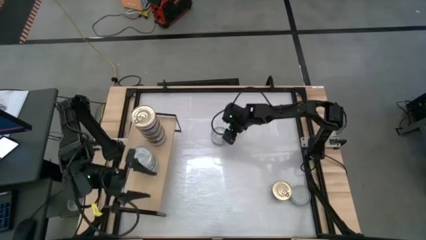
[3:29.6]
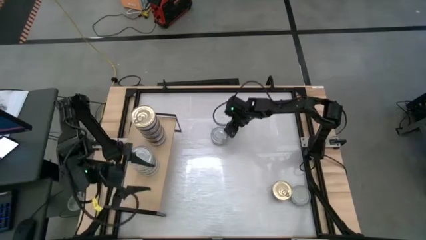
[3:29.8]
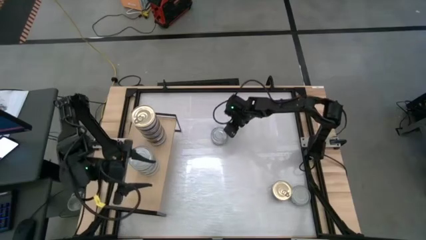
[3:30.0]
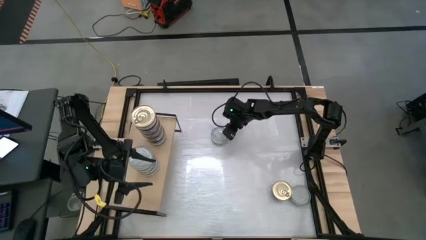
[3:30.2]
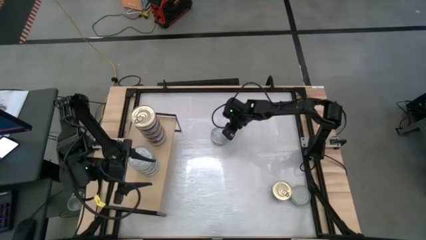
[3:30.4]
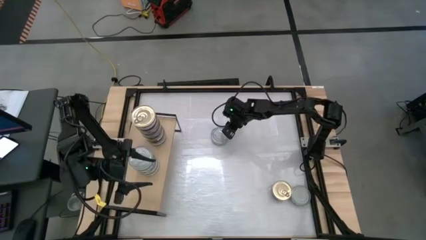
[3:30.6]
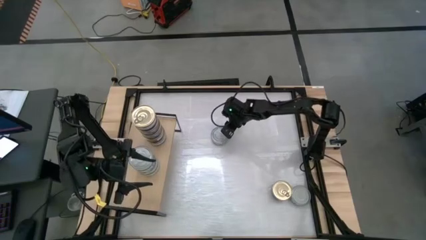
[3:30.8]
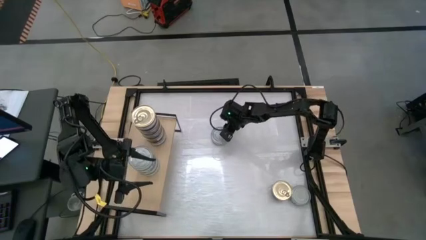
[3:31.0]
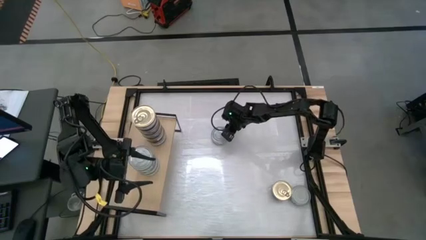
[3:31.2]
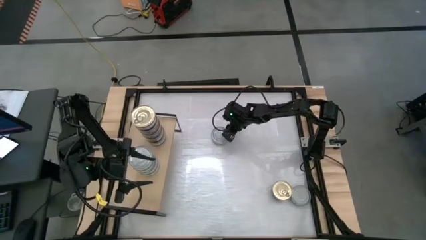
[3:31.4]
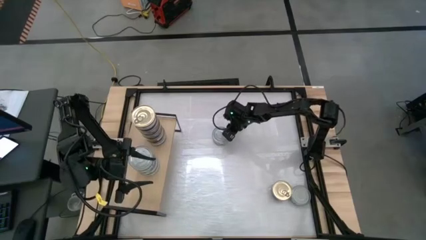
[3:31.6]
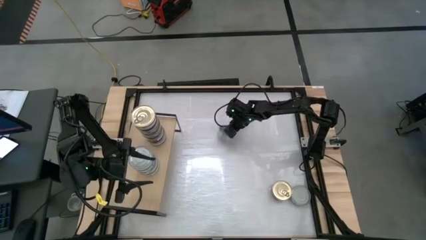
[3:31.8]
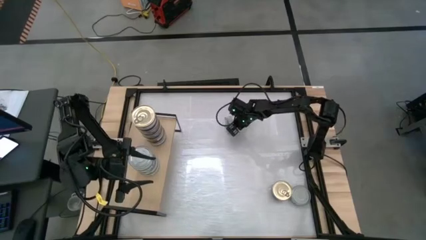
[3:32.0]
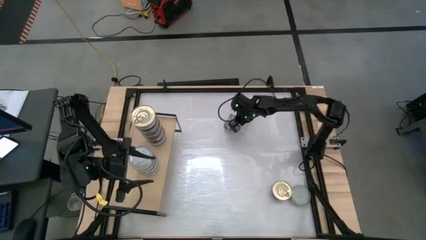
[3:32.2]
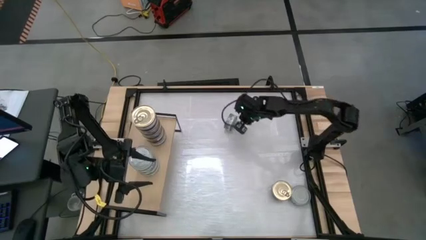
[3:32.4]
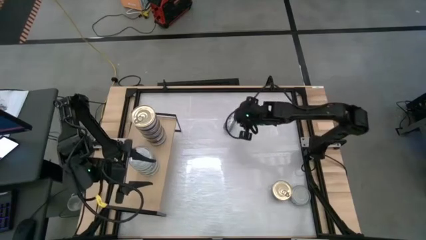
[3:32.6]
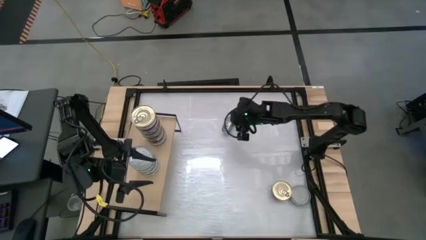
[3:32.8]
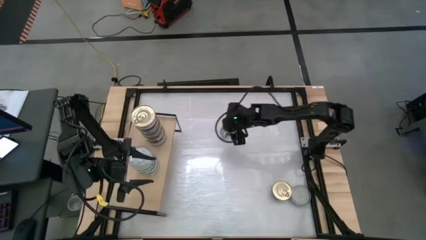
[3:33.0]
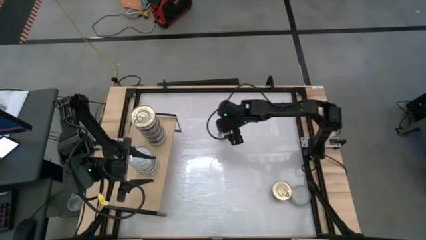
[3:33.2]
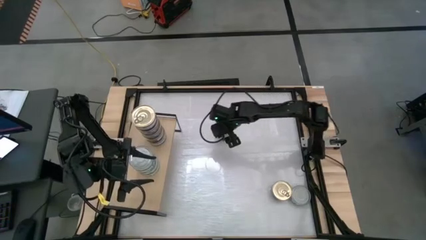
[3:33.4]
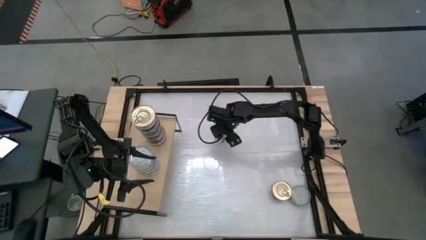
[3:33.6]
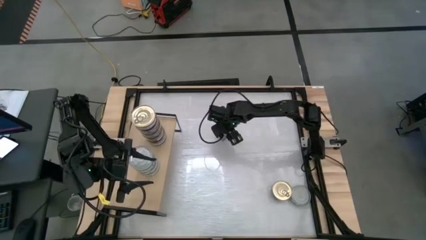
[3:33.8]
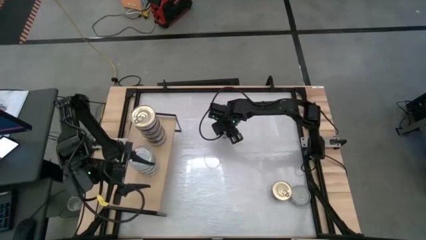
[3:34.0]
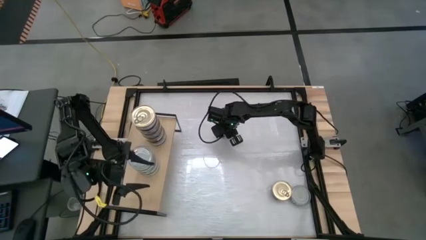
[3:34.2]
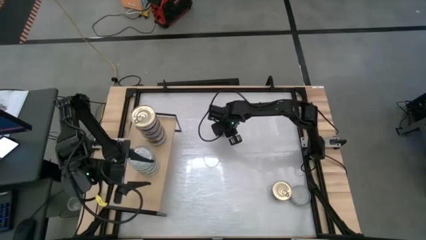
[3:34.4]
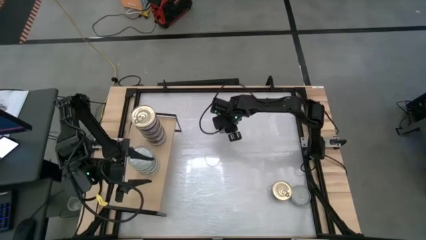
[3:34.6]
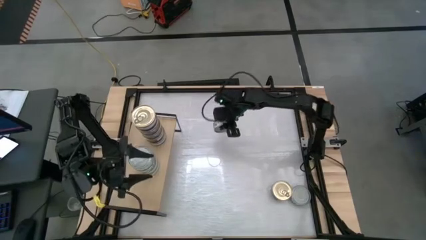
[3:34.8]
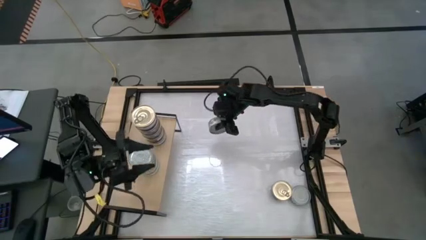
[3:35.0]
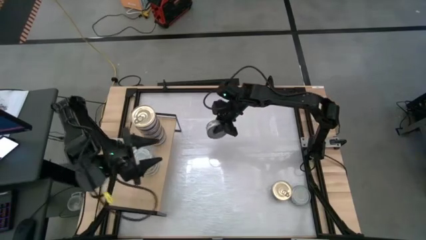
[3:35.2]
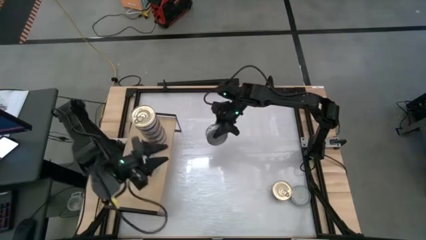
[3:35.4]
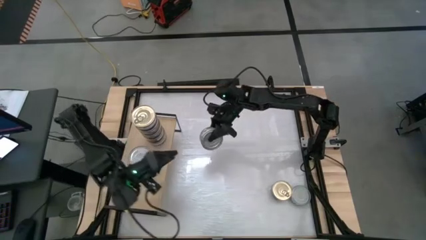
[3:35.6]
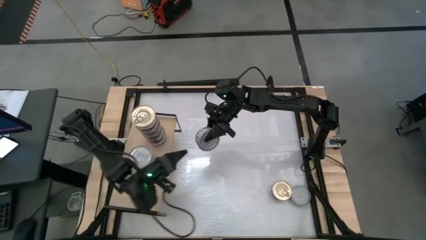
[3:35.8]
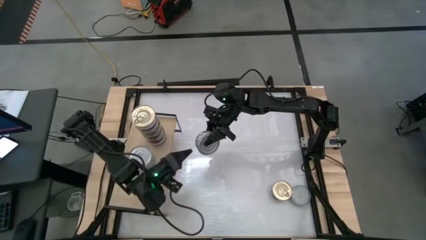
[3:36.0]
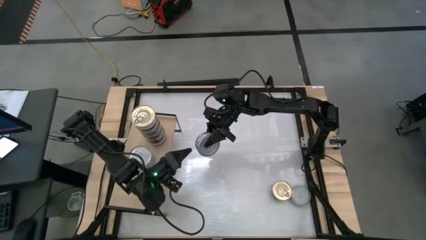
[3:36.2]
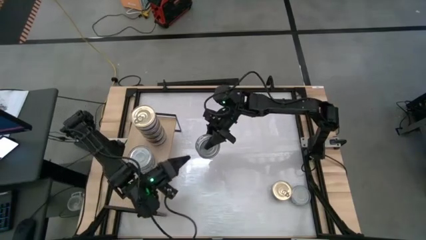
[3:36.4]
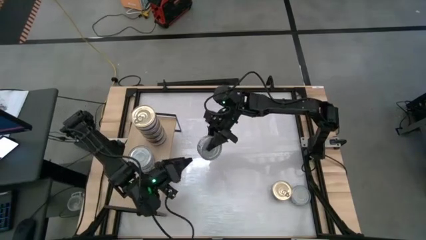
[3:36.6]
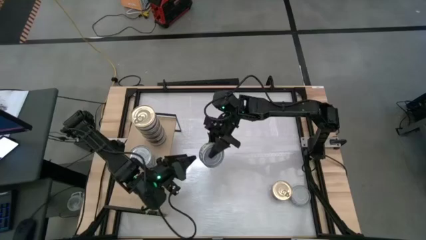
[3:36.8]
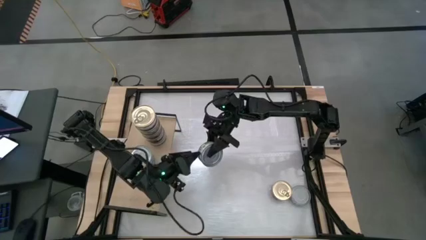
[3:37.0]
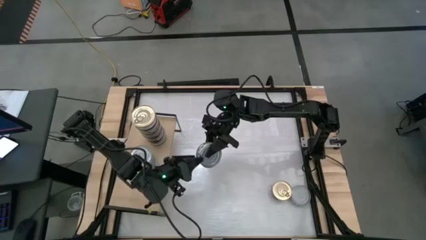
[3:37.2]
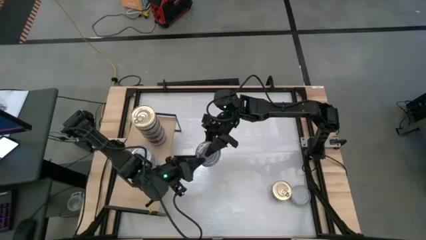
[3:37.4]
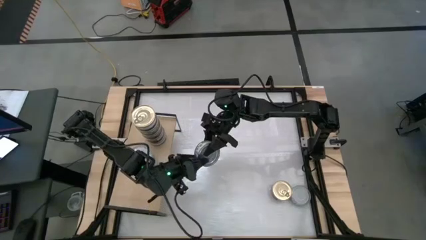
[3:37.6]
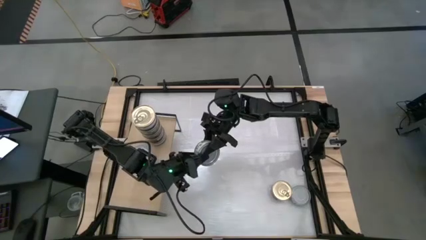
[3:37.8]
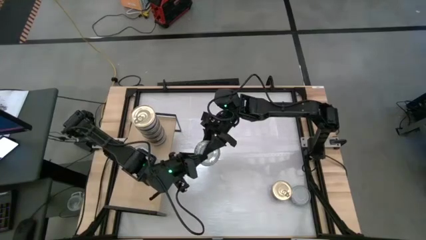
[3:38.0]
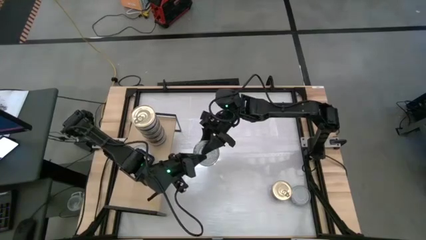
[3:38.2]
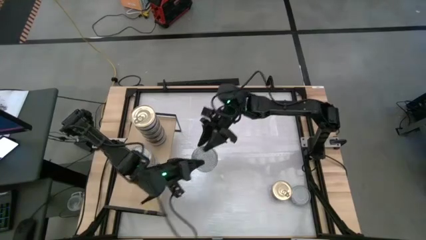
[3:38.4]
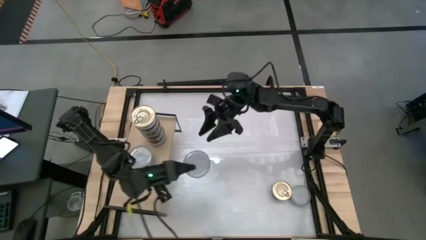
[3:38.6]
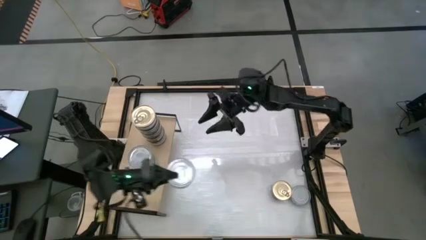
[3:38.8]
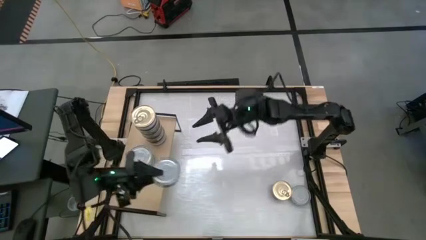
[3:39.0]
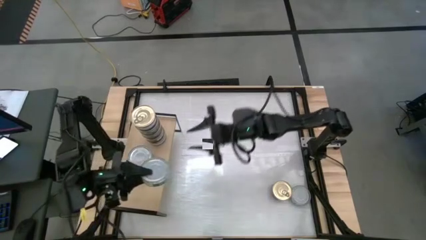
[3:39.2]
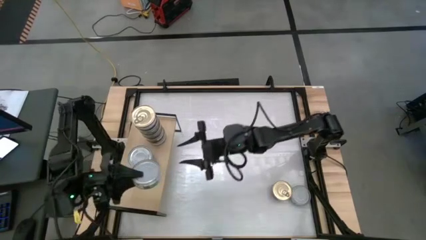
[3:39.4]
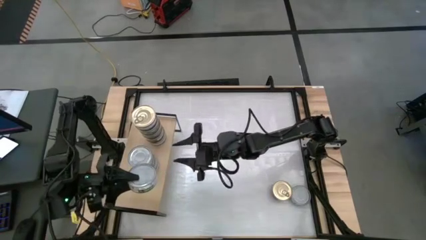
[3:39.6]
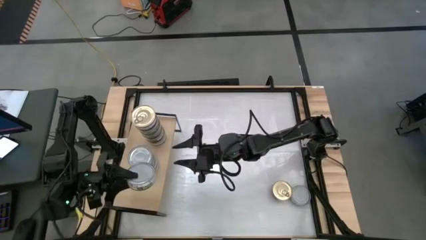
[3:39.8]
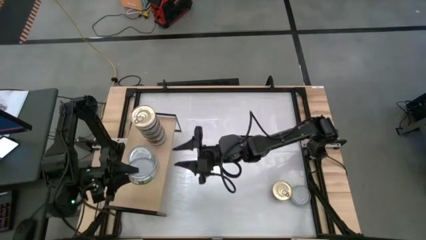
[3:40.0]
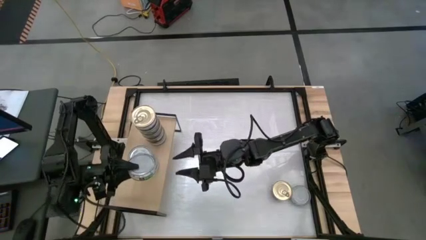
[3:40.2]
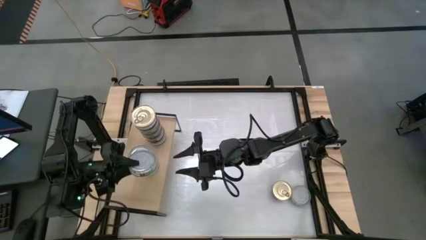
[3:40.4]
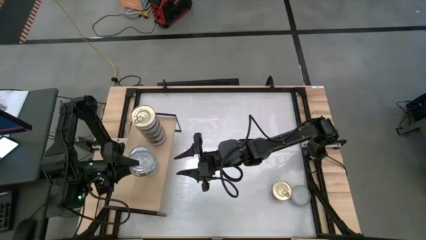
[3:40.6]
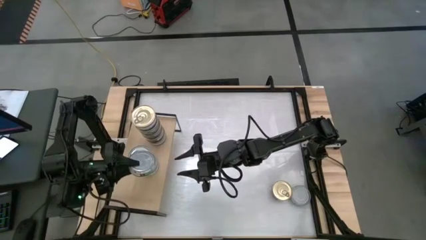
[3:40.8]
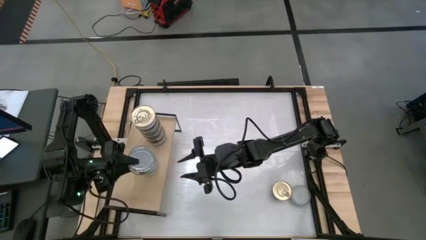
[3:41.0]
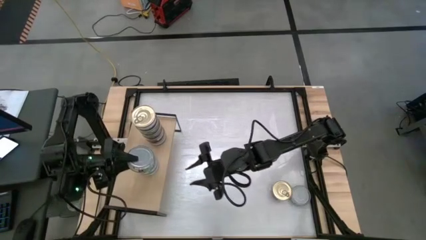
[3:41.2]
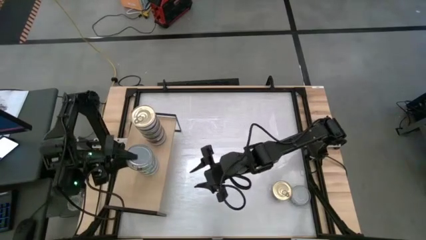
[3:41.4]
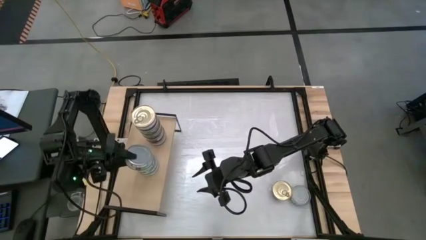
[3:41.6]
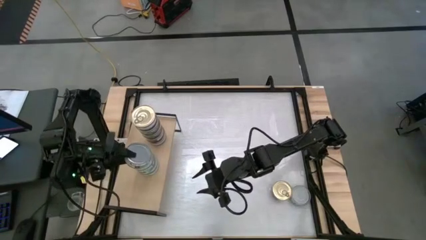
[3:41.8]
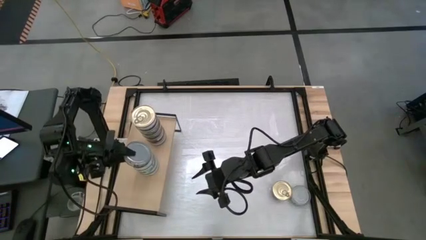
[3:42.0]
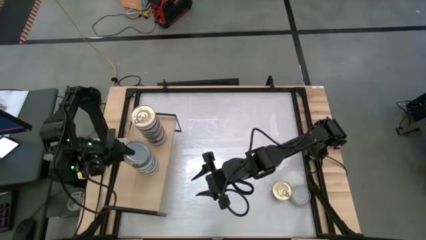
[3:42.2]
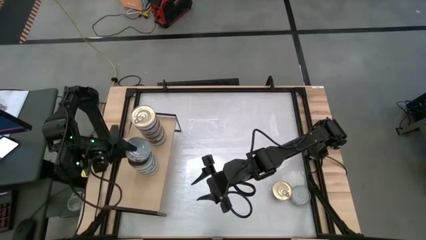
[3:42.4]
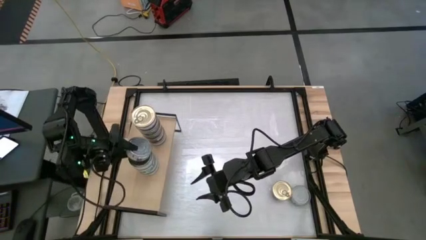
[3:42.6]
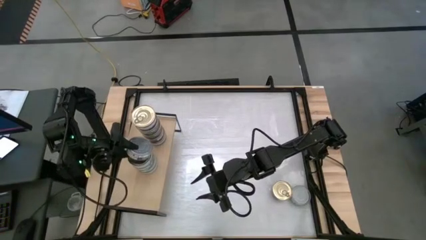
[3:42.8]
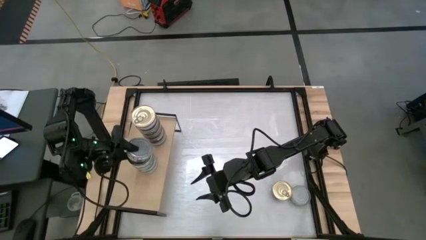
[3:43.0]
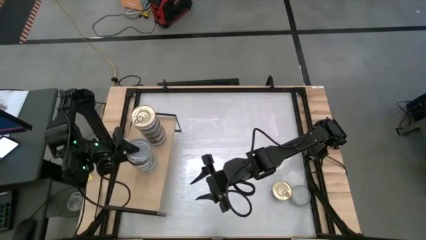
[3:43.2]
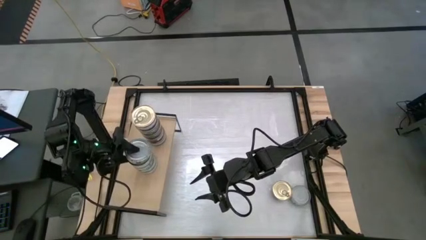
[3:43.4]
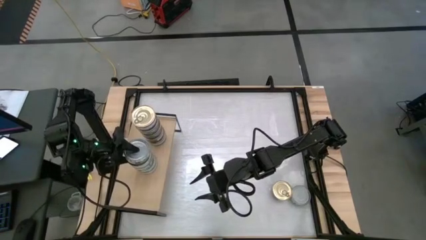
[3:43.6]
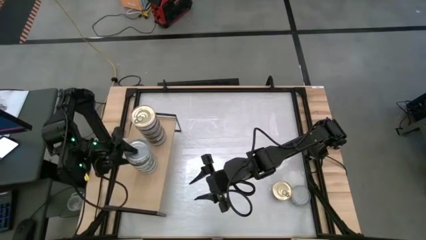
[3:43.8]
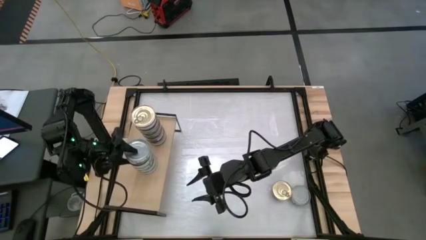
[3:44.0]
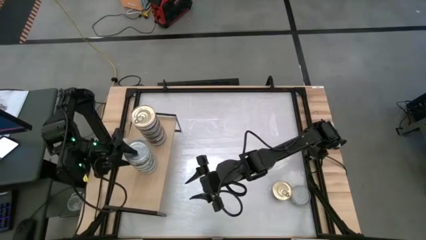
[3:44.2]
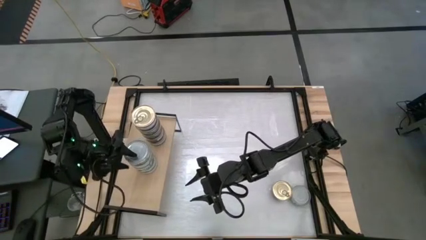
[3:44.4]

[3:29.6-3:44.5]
Task: Stack canned seafood by type on shelf
Stack the green tuna can on top of the green tuna can on the shelf

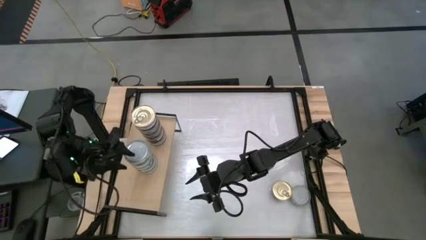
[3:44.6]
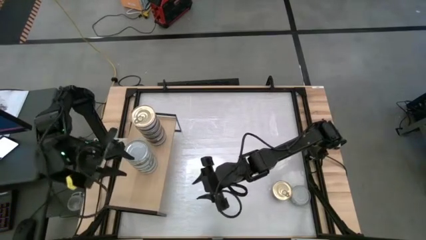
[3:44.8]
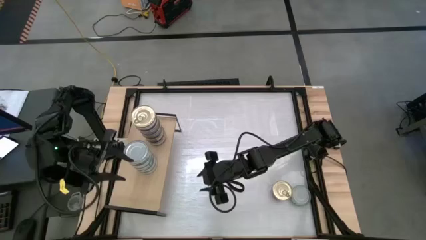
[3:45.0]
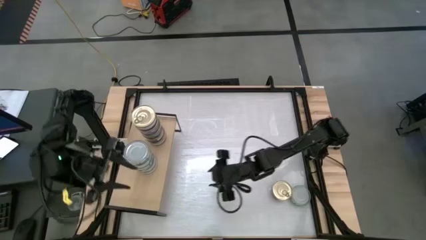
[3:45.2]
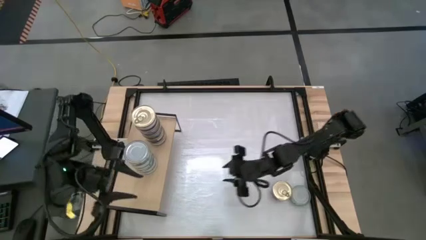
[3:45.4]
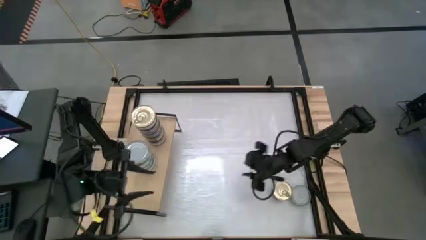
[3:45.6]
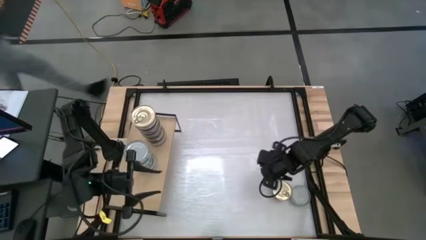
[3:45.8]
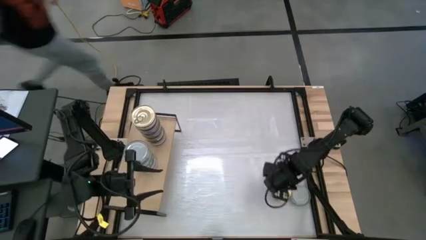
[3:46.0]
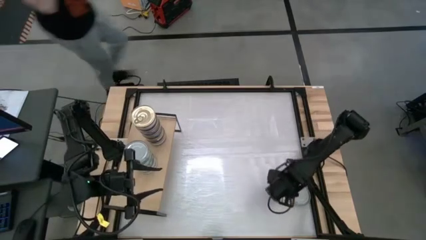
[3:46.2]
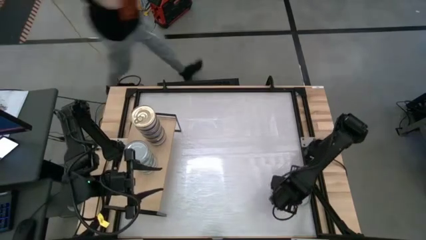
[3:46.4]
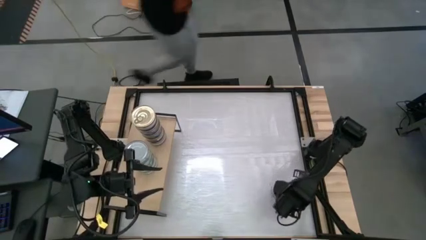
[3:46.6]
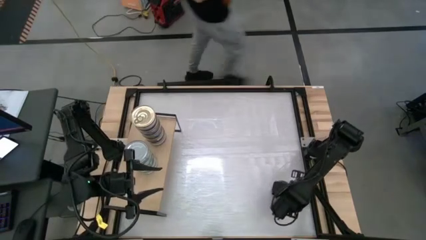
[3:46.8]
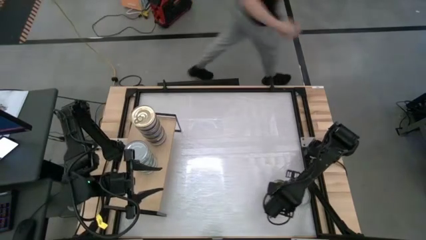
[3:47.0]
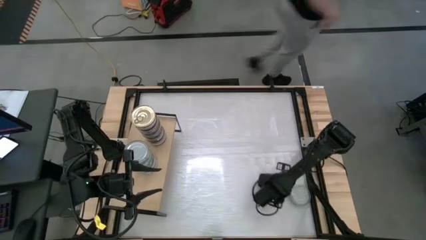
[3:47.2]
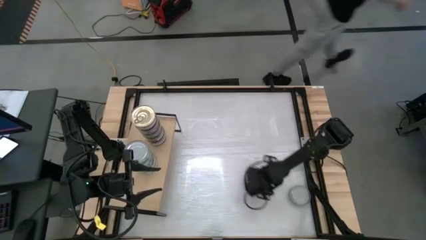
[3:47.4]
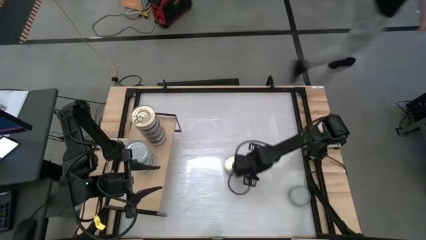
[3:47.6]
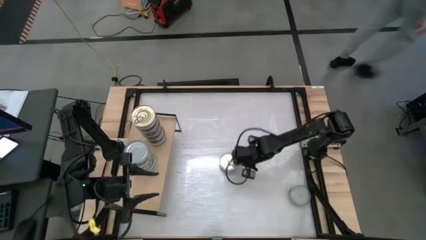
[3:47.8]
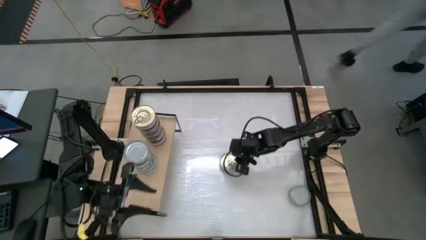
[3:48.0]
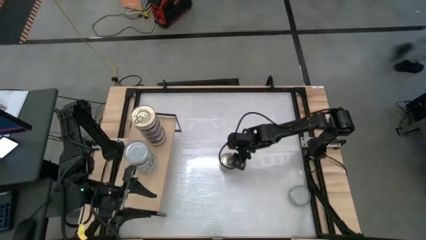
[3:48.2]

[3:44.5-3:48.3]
Move the blue tuna can to the center of the table
